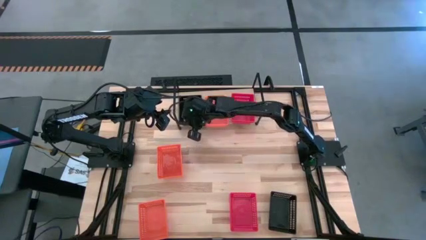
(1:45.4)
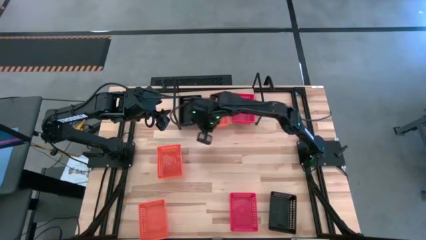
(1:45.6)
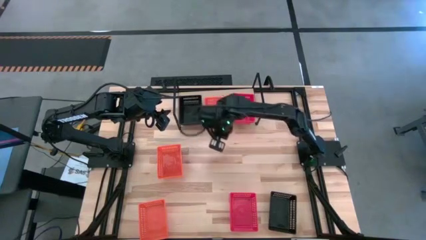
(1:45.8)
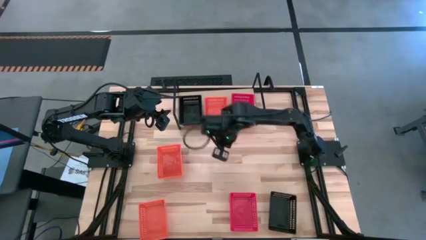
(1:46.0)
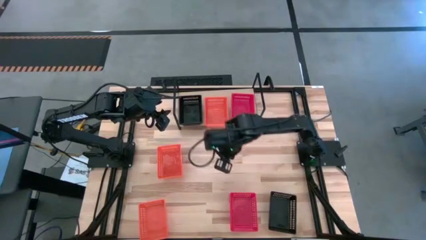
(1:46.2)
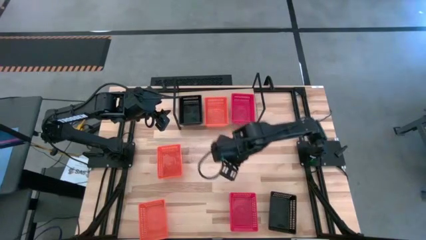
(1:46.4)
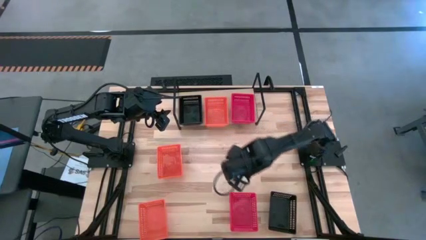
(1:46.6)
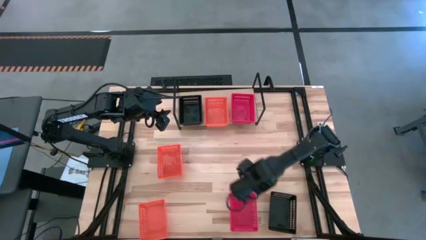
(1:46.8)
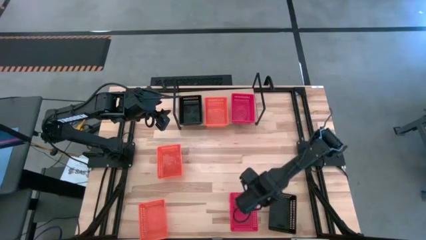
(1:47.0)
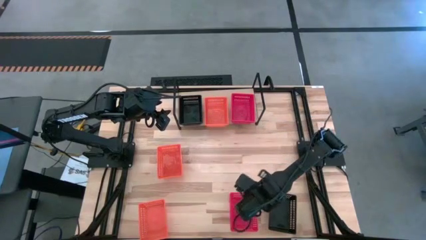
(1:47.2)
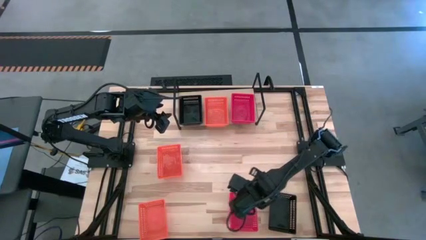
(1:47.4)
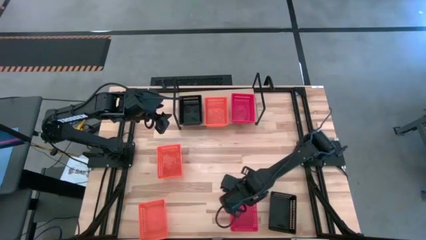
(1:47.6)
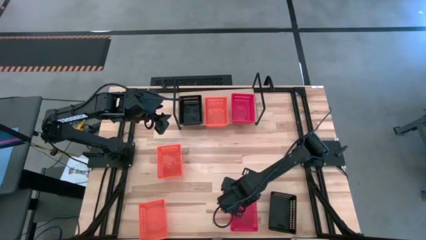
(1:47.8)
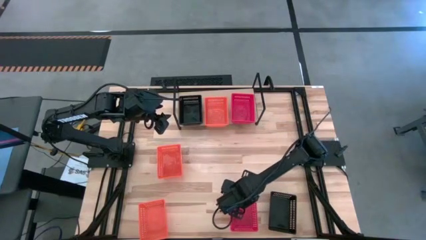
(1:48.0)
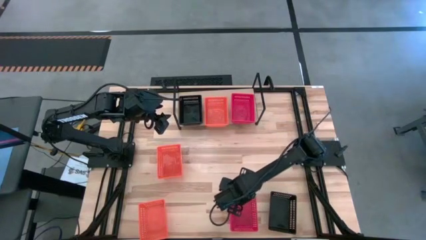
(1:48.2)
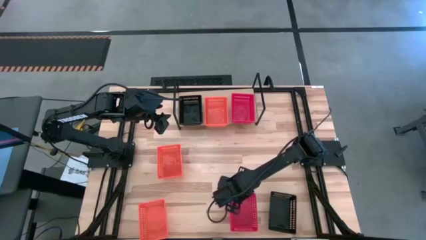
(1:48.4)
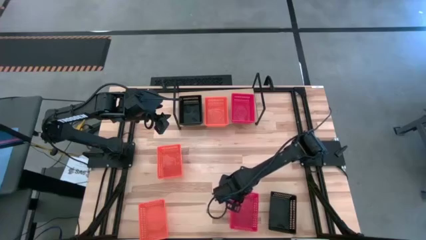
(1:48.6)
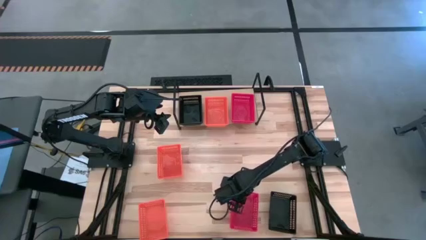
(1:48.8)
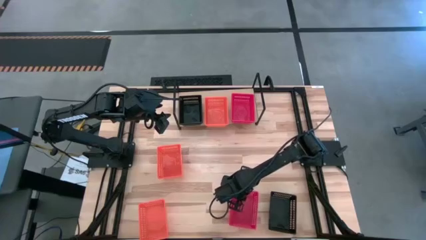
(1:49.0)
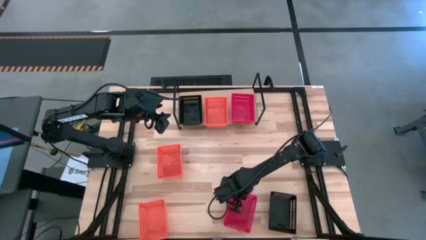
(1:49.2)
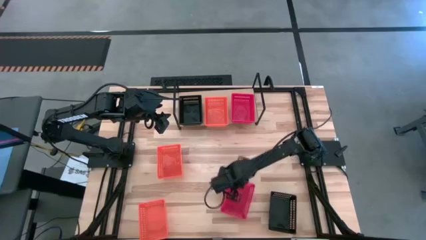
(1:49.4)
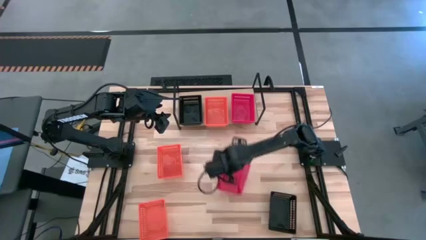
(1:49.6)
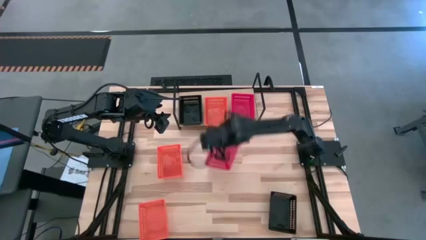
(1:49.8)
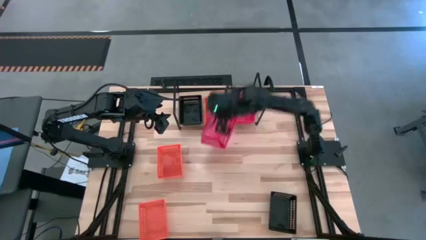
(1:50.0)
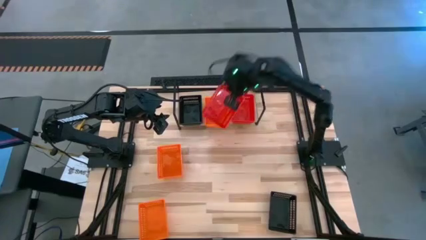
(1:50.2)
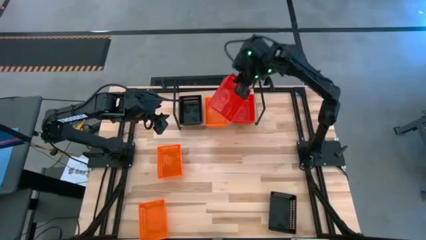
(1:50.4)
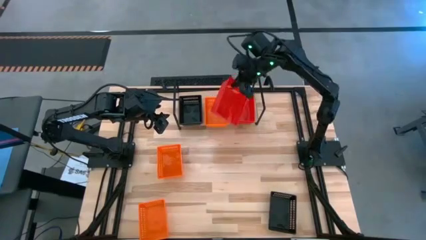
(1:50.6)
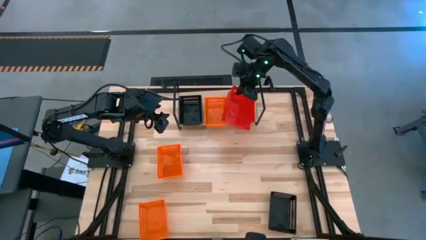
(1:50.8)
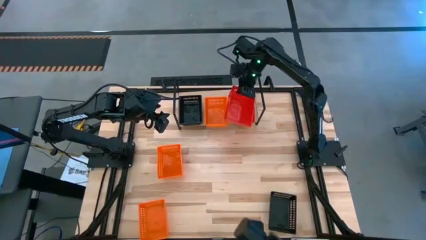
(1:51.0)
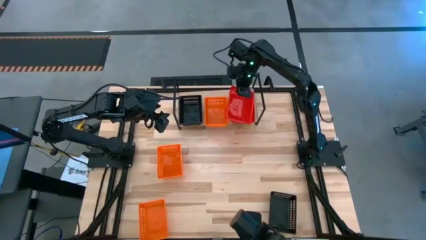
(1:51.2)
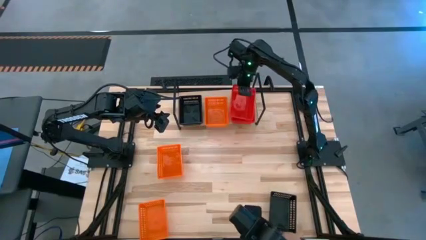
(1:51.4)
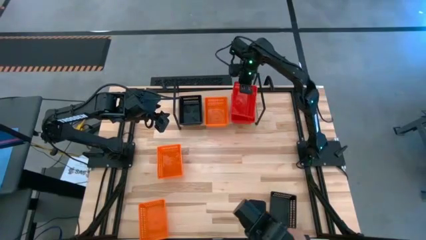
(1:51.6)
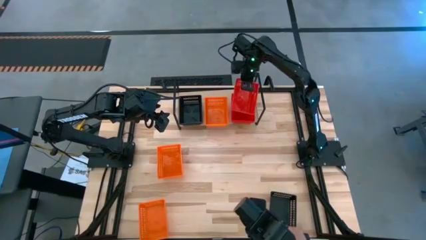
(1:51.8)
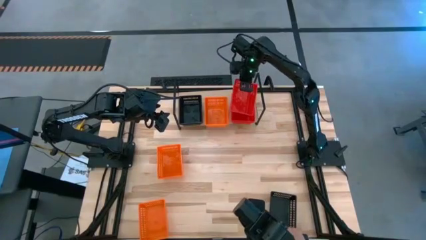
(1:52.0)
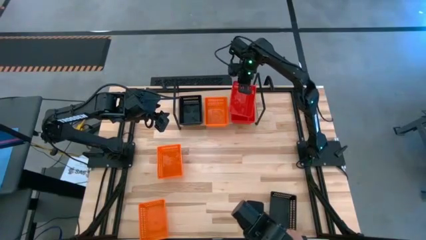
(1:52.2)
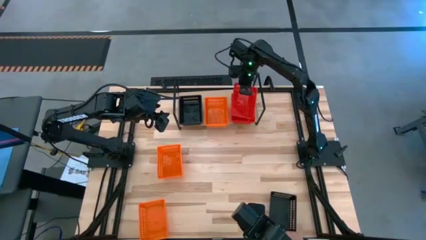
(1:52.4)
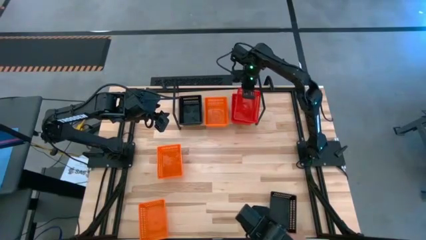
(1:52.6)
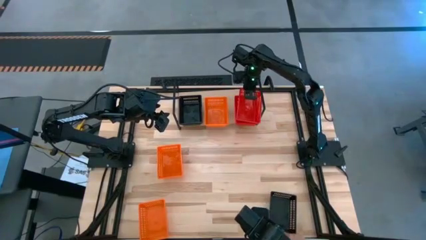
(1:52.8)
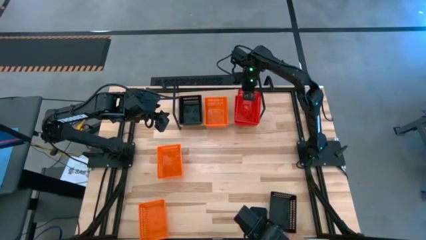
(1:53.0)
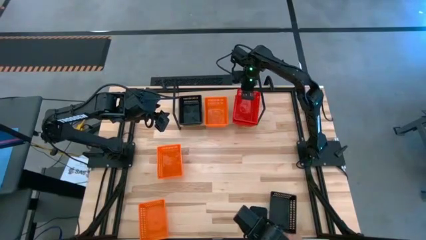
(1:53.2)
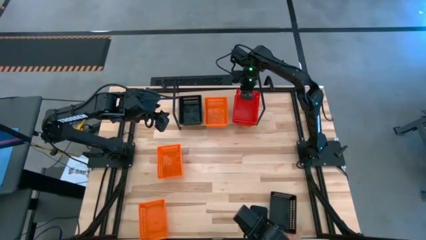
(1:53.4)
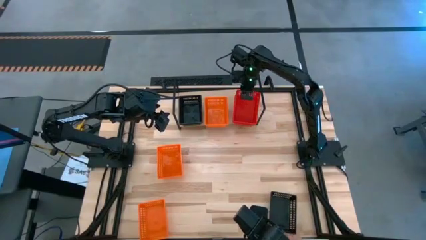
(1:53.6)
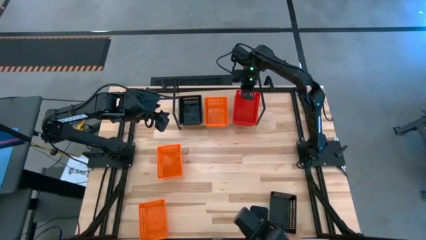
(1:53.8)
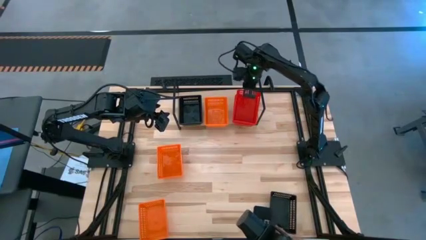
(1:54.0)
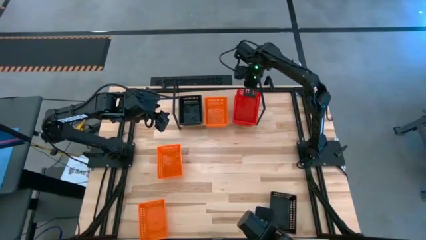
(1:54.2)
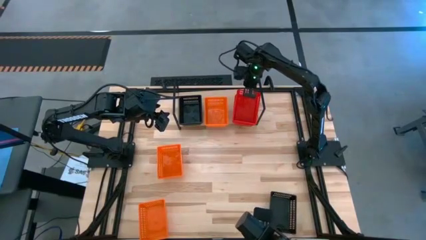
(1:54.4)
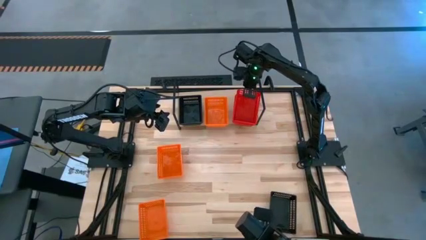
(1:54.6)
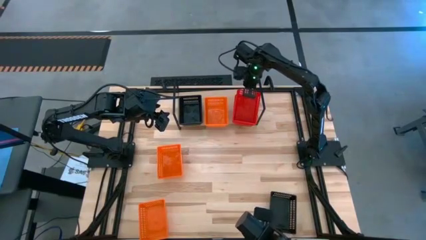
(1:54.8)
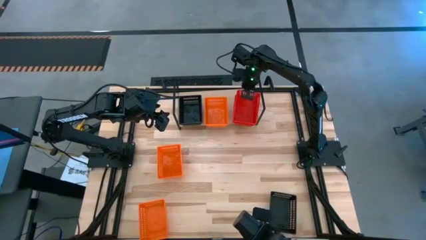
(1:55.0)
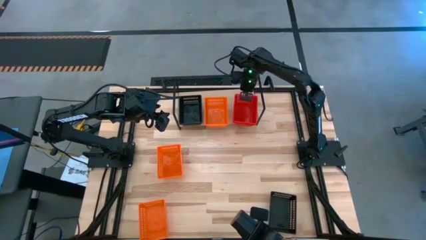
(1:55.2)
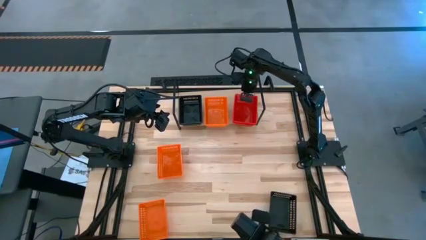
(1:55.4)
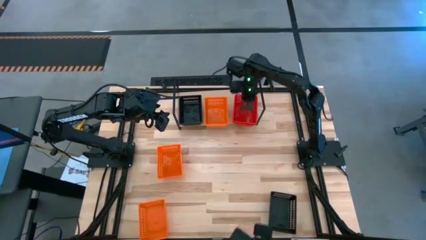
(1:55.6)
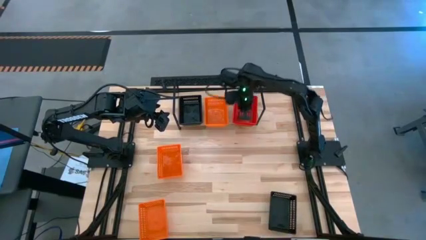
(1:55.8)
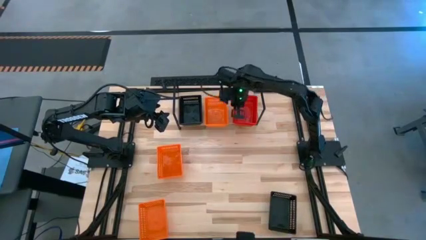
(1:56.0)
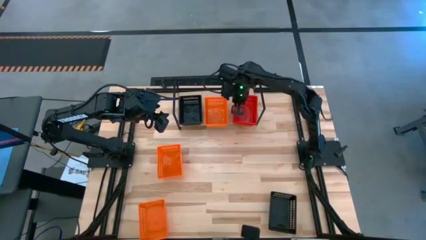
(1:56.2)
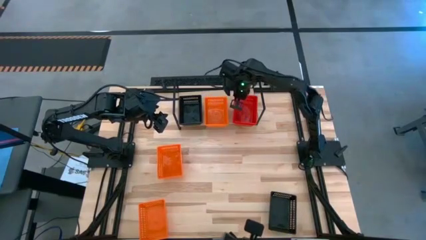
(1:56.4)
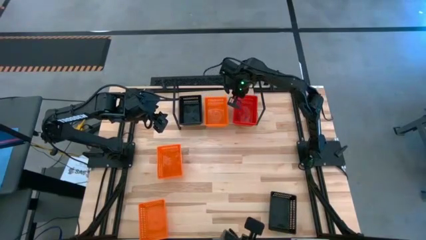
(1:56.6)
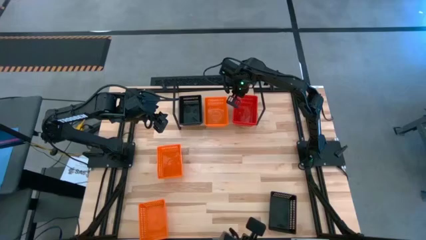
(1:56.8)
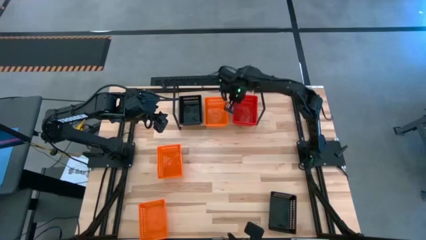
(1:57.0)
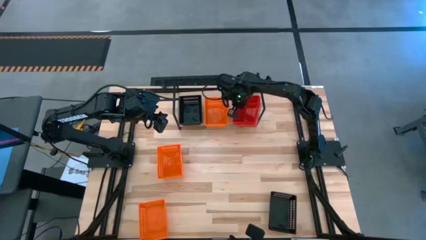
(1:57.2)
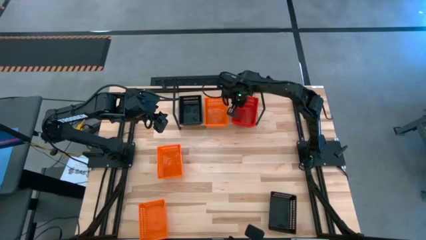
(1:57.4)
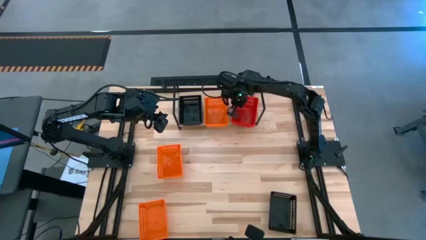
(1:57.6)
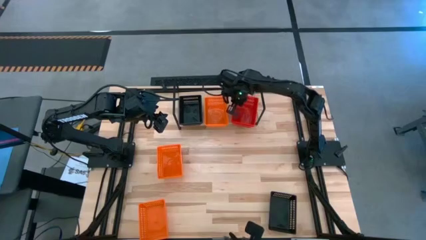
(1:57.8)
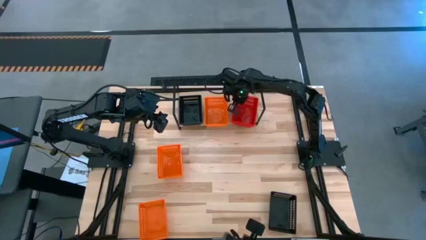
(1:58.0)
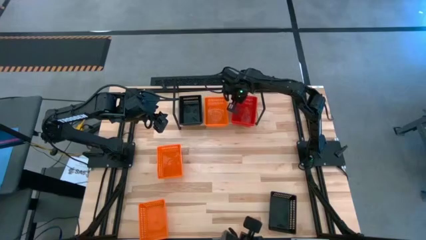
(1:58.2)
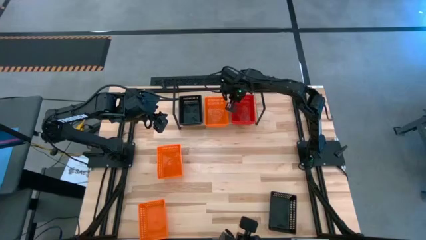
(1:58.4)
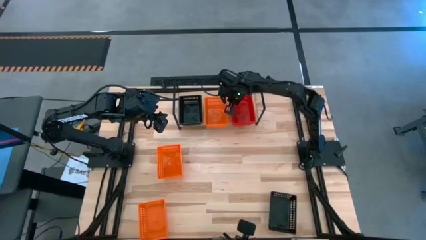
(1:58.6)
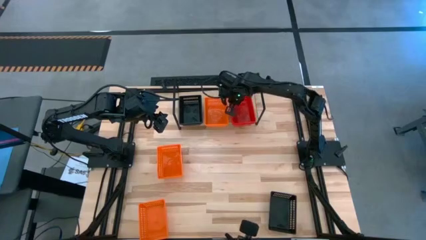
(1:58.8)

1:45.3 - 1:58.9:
Task: Stack baskets on shelf by color
Stack the red bin on top of the other red bin on the shelf
